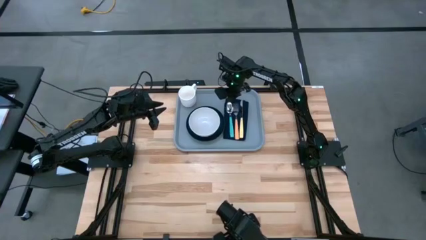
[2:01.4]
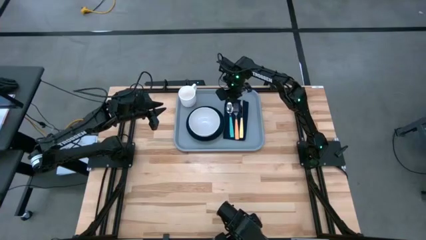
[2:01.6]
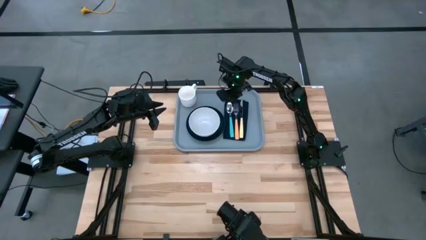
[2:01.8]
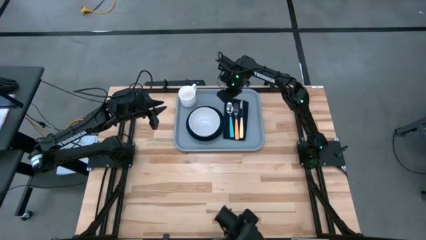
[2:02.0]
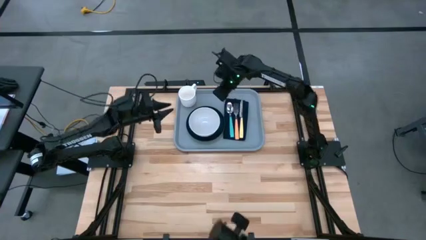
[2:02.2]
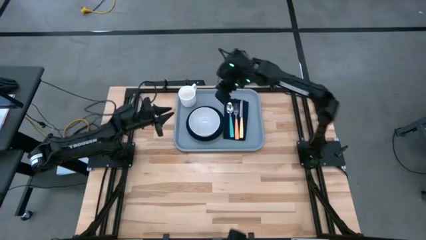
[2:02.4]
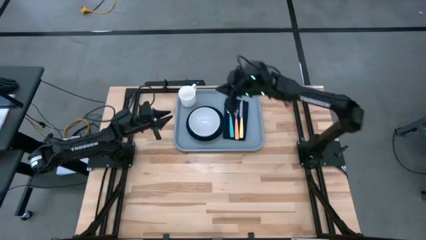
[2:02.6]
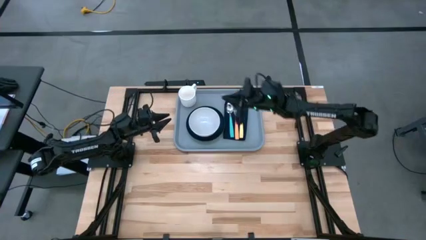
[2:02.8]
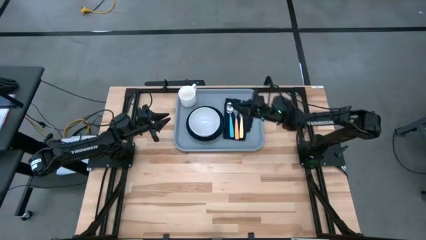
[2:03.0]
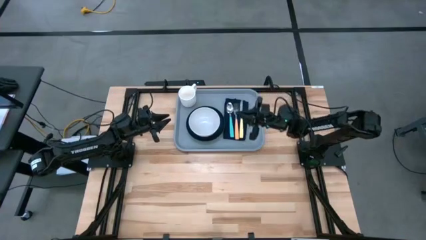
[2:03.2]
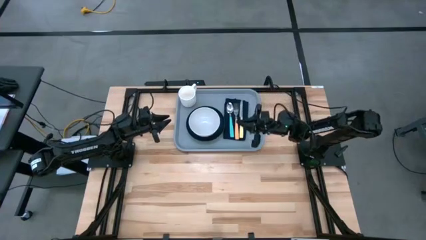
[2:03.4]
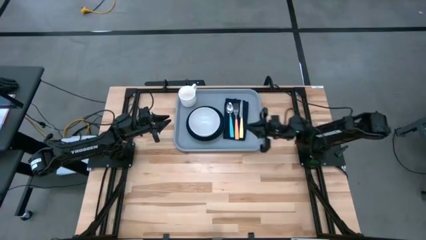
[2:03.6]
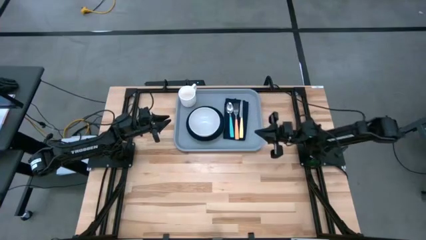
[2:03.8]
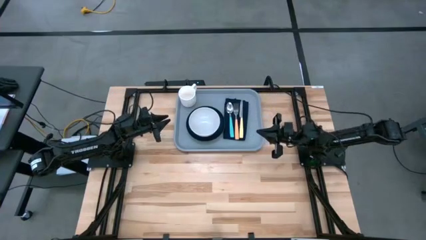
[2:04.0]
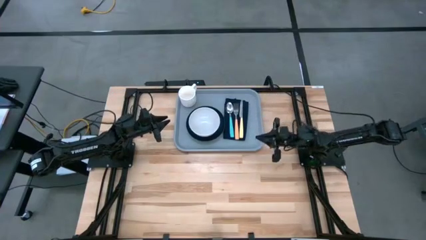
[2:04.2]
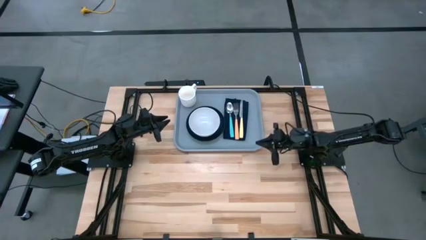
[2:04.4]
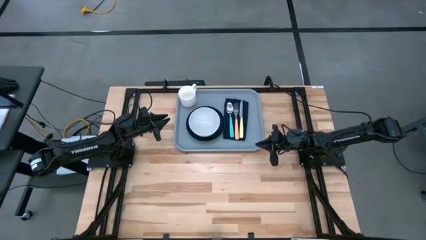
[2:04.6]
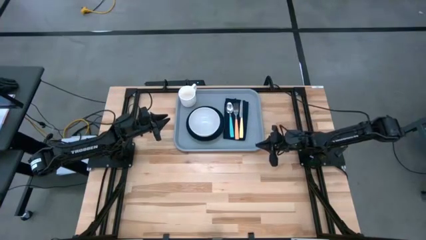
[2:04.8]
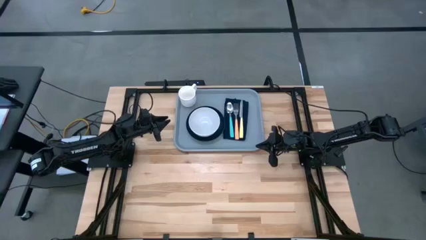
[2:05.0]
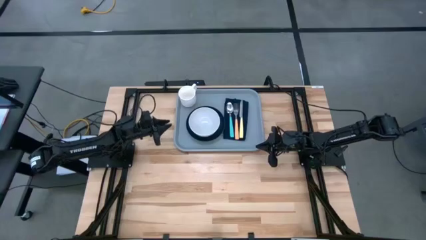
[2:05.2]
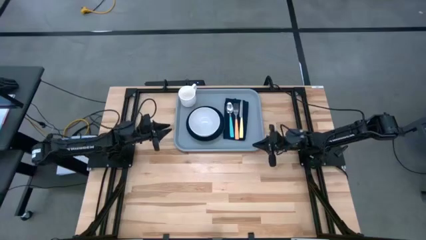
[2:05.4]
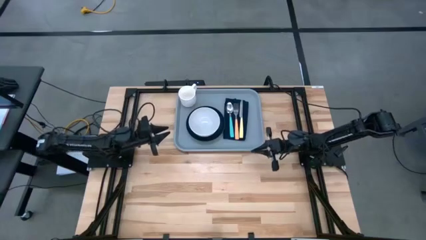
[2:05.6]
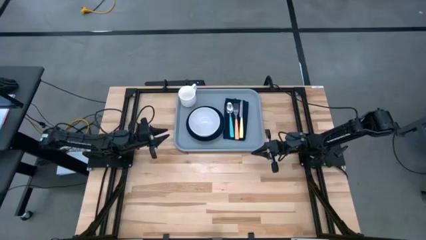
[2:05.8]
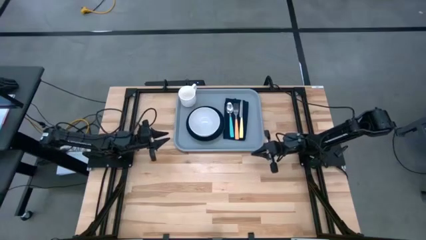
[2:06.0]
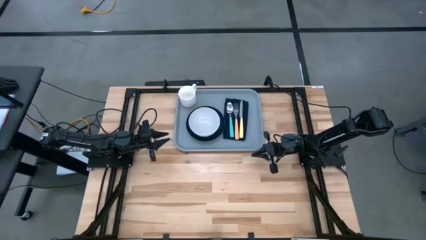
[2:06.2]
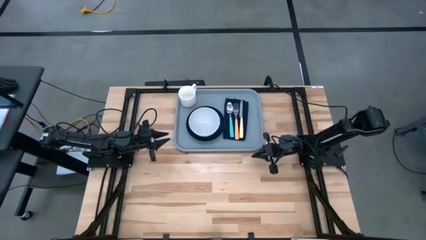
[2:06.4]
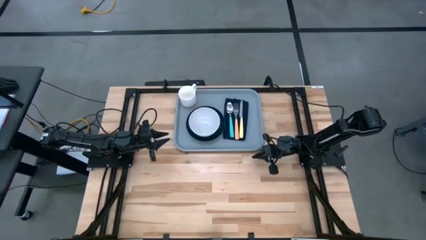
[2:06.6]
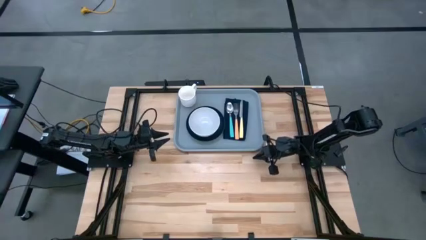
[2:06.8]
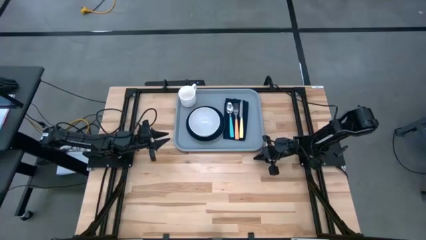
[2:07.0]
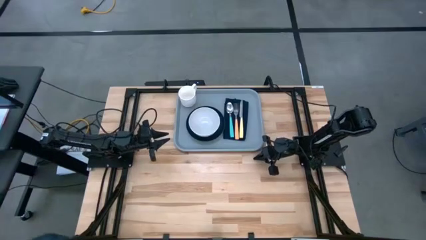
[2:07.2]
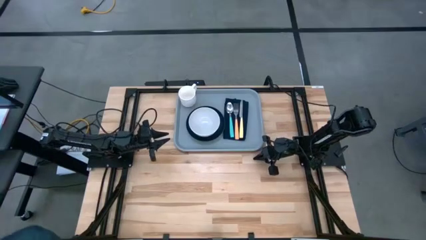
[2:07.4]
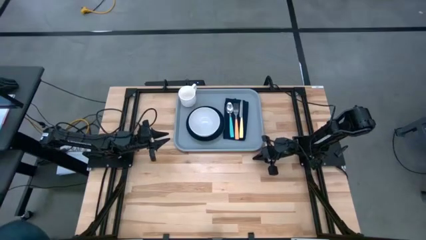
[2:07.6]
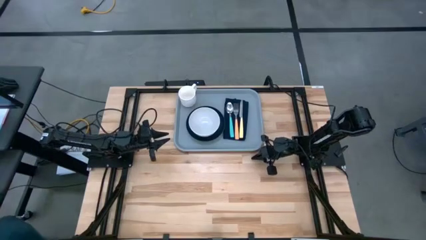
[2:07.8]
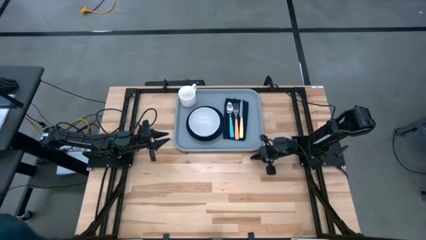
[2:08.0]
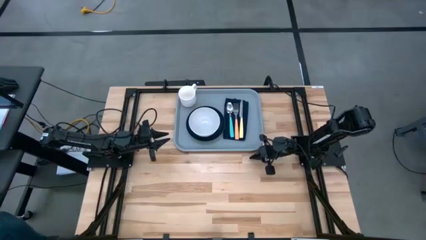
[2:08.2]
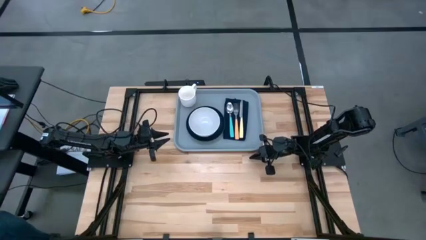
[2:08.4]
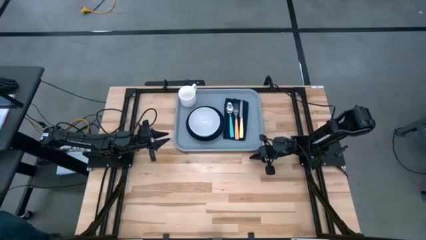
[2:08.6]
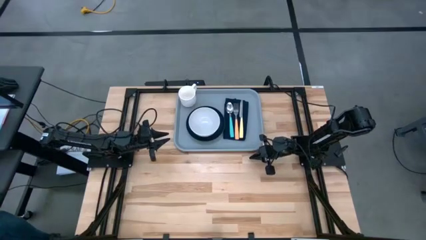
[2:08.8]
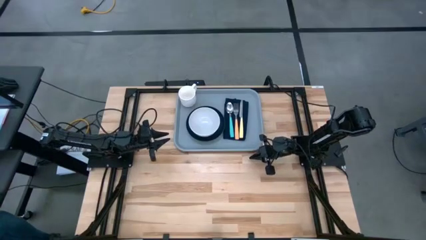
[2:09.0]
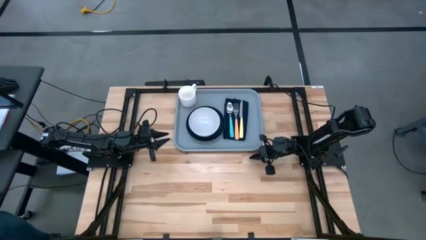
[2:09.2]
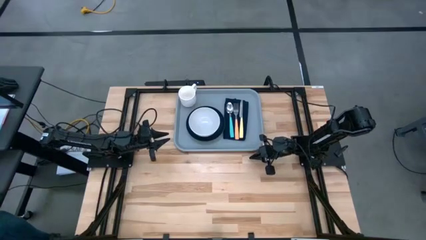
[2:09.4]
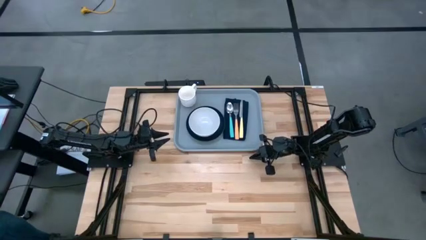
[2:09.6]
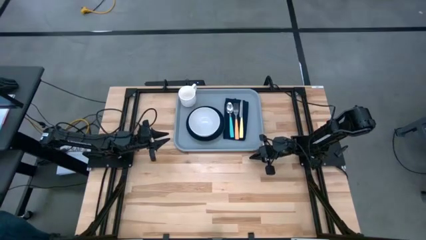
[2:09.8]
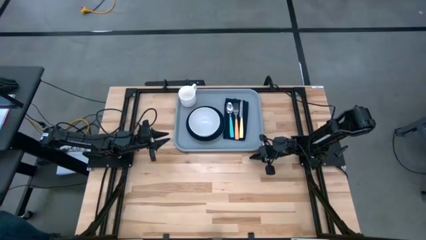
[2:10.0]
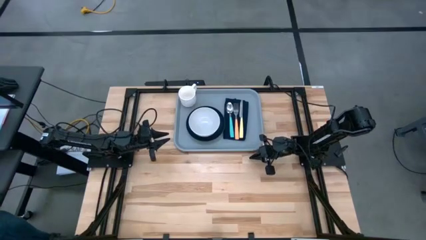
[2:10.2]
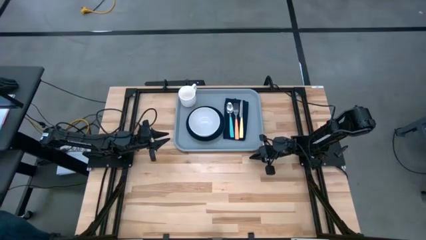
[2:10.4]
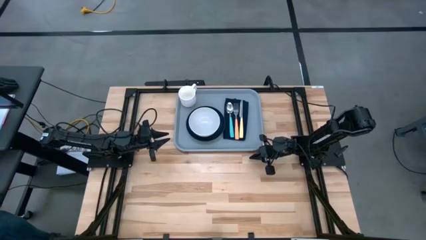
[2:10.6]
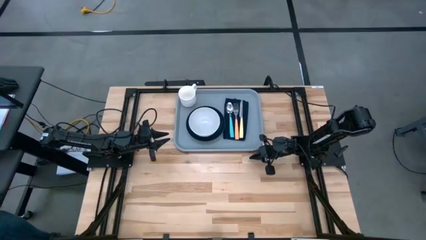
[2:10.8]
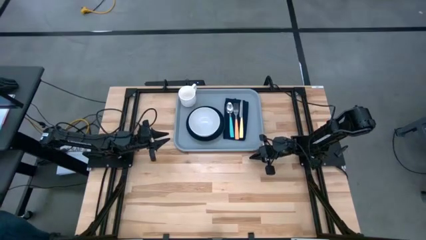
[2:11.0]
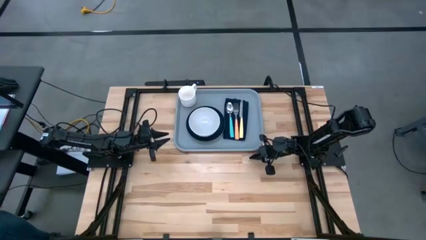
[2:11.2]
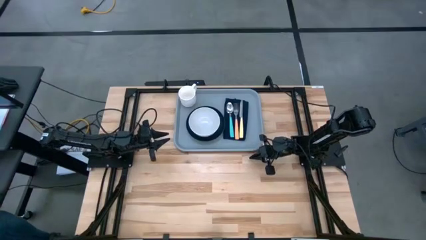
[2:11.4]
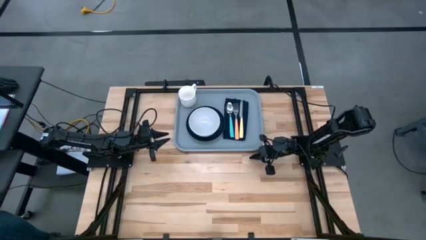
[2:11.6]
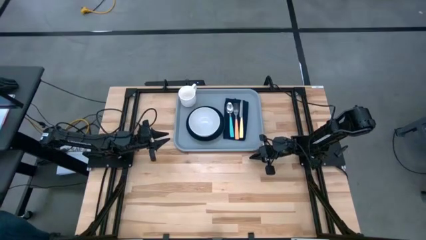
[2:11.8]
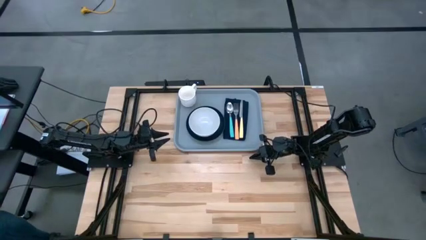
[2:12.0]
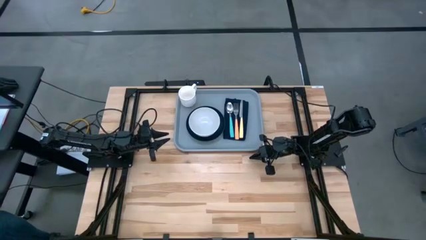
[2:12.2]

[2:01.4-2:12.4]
Task: Set up tray
Return to Home Position

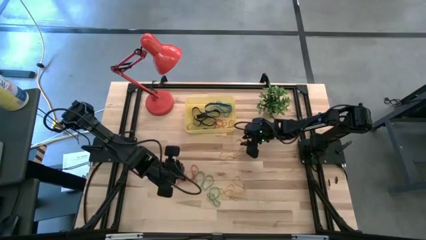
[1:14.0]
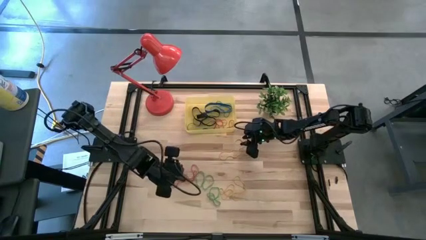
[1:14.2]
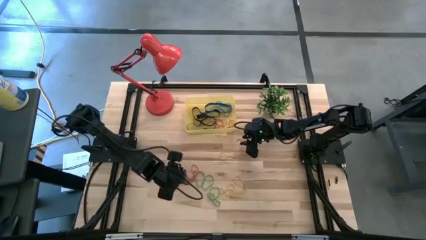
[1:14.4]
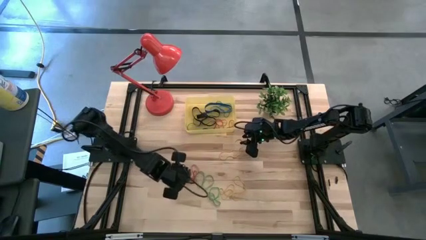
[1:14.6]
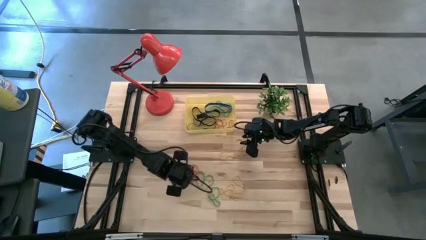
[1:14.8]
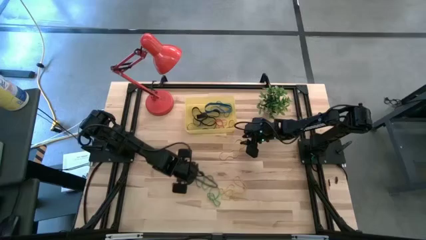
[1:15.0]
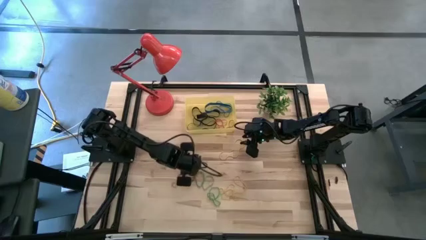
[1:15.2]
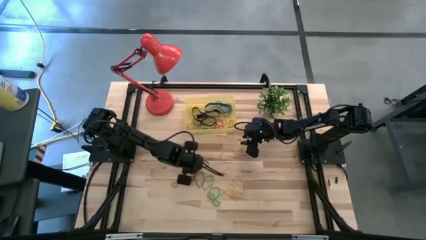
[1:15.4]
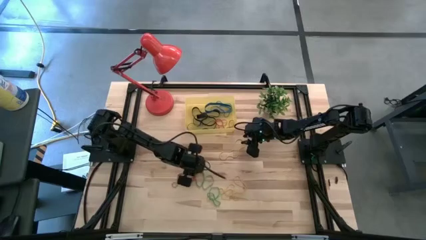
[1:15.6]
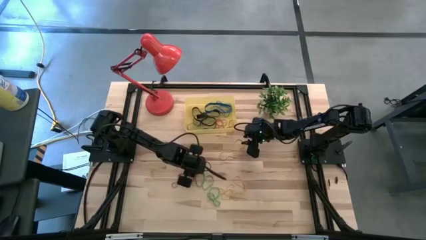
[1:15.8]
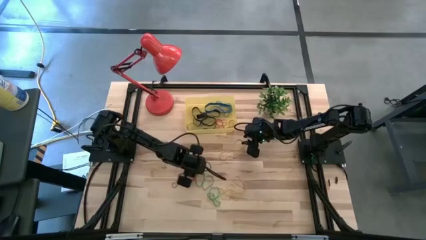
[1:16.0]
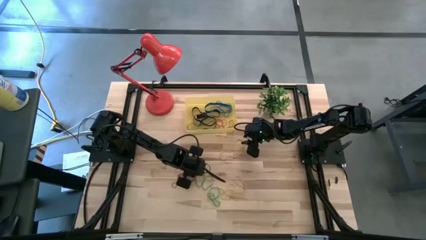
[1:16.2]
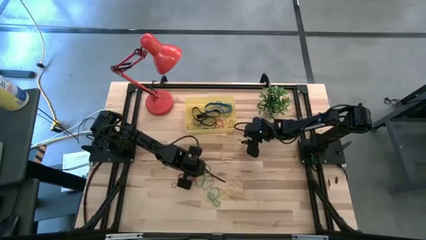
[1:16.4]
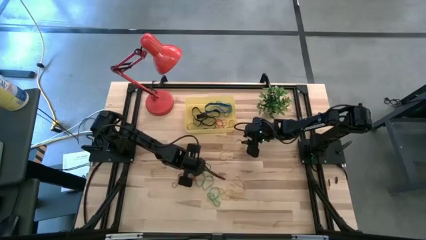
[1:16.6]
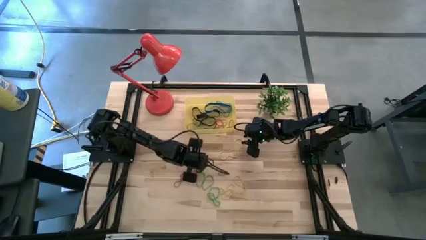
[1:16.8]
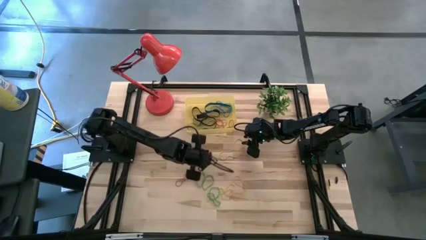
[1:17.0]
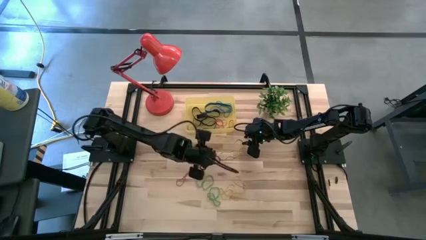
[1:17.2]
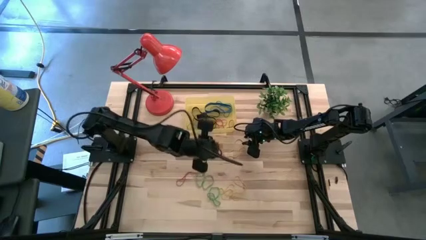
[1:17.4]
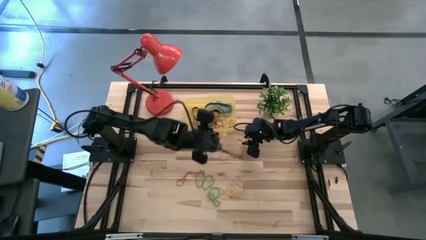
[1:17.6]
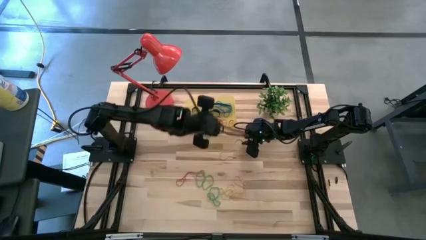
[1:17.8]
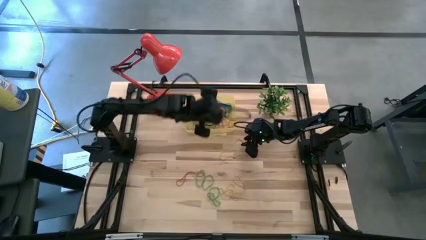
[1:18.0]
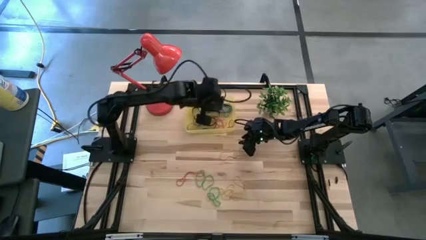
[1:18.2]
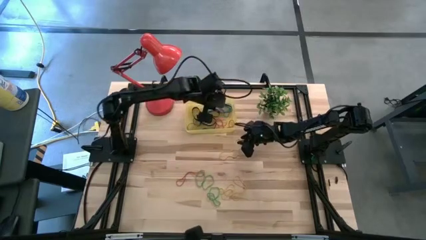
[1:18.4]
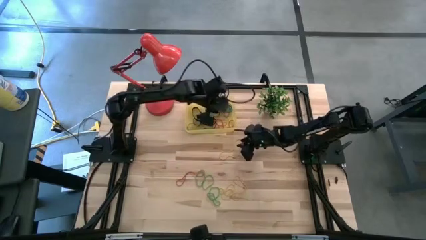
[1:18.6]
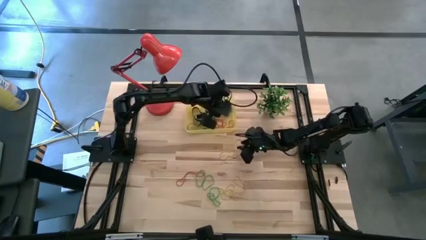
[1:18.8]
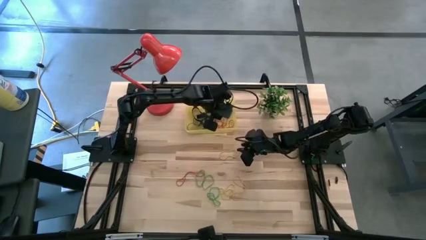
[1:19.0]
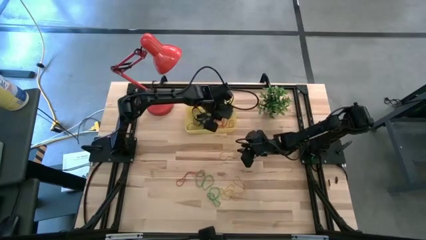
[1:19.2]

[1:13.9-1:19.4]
Task: Pick and place rubber bands into bin
Put the red rubber band into the yellow container
